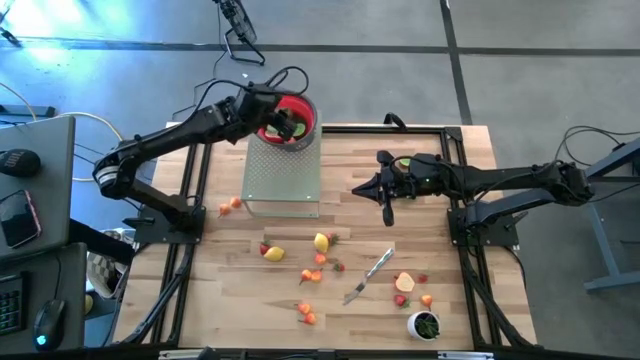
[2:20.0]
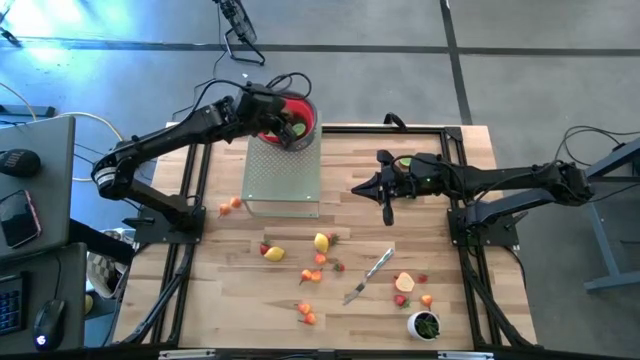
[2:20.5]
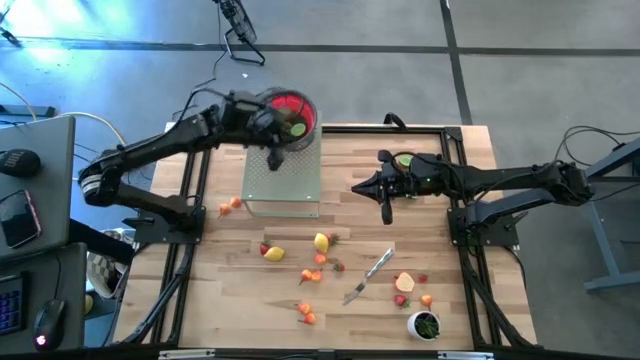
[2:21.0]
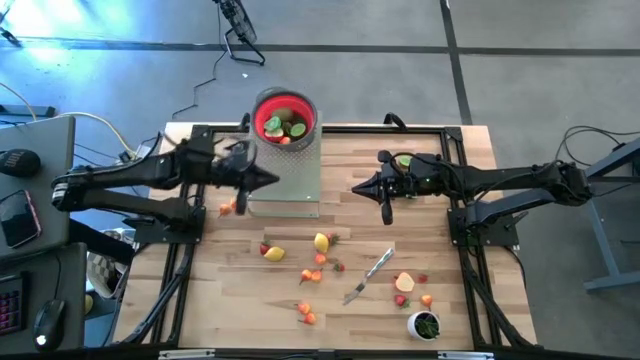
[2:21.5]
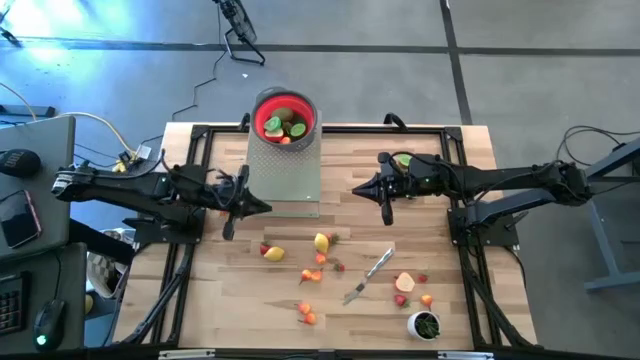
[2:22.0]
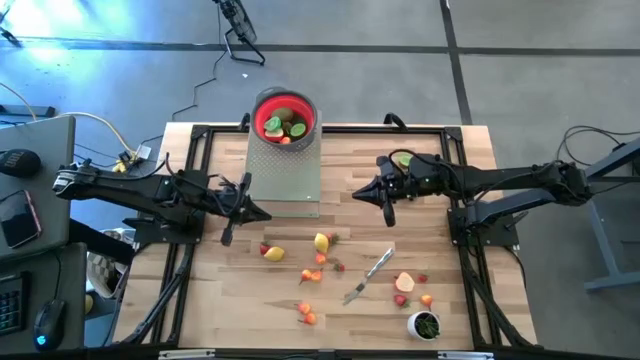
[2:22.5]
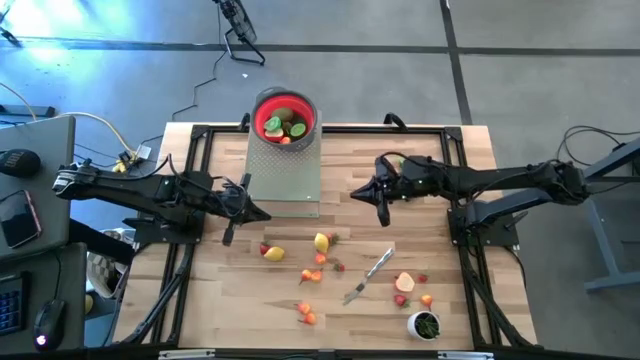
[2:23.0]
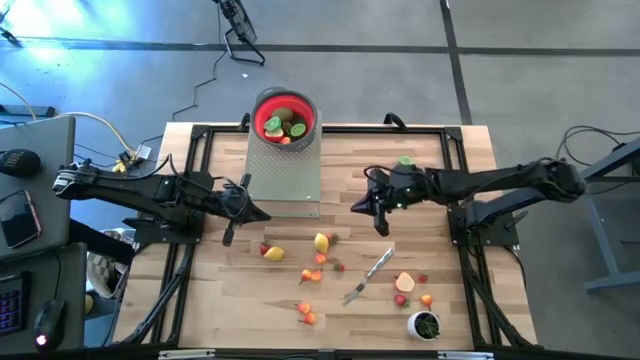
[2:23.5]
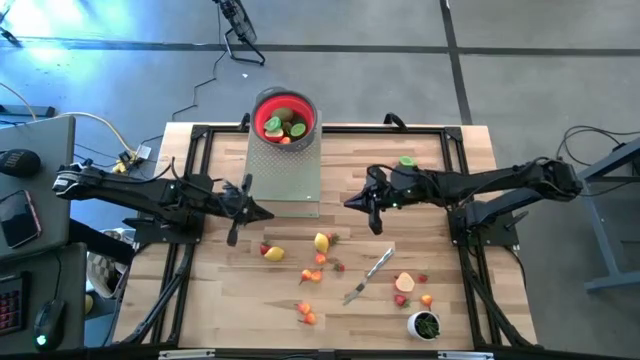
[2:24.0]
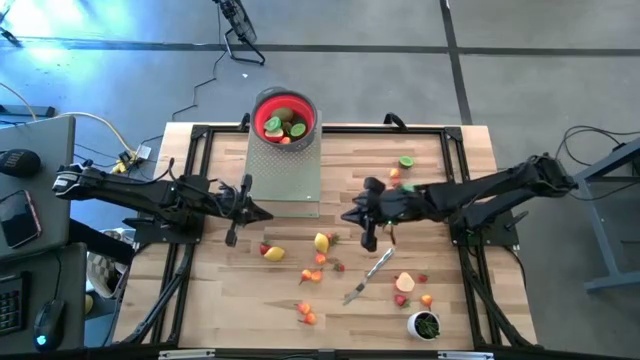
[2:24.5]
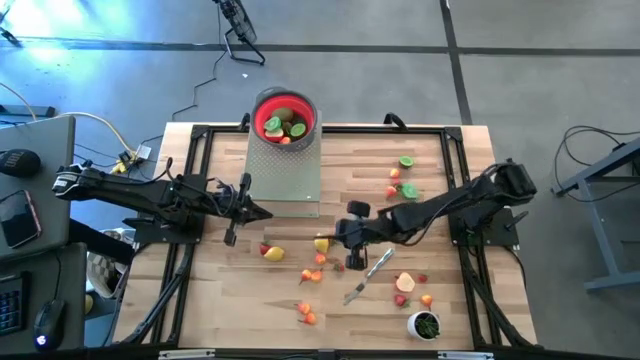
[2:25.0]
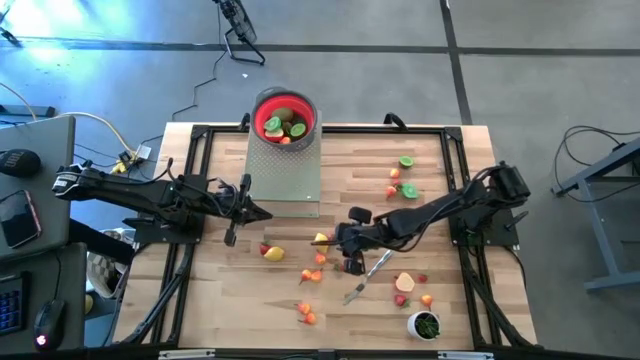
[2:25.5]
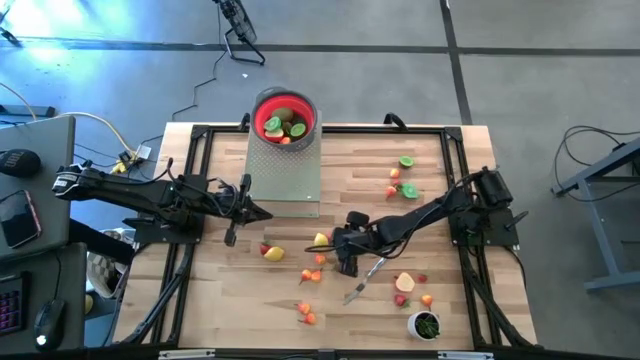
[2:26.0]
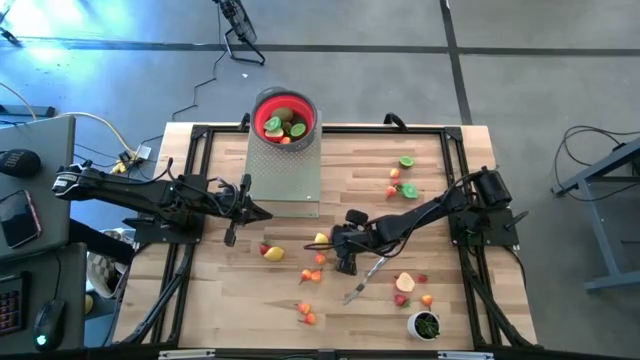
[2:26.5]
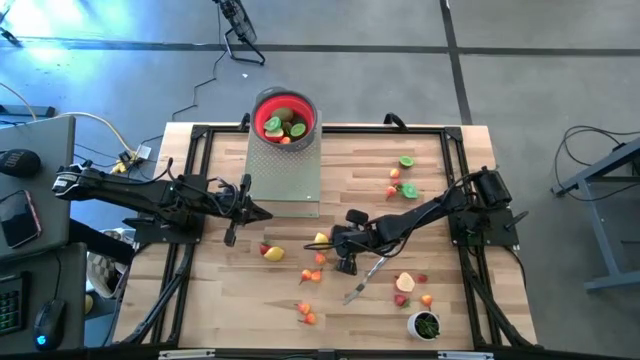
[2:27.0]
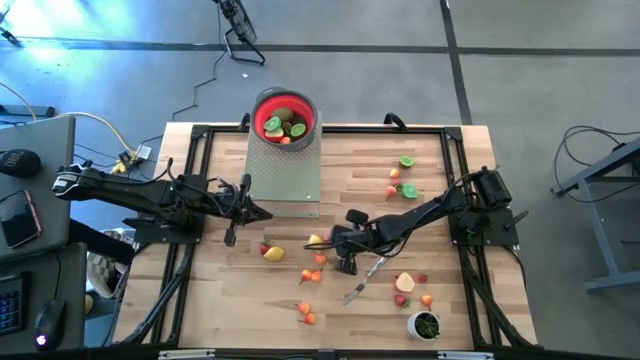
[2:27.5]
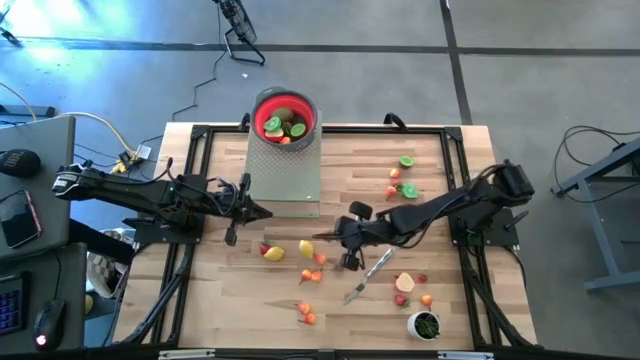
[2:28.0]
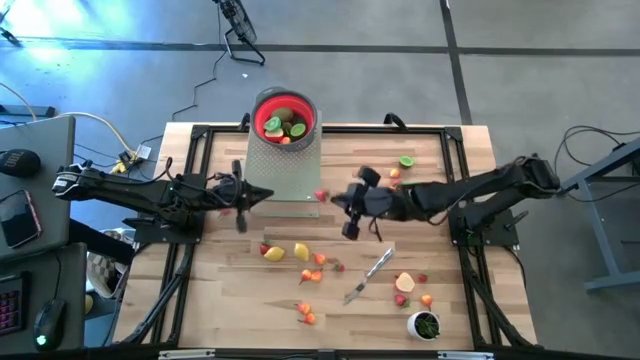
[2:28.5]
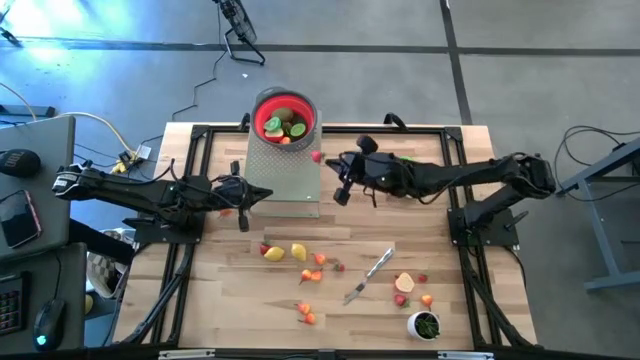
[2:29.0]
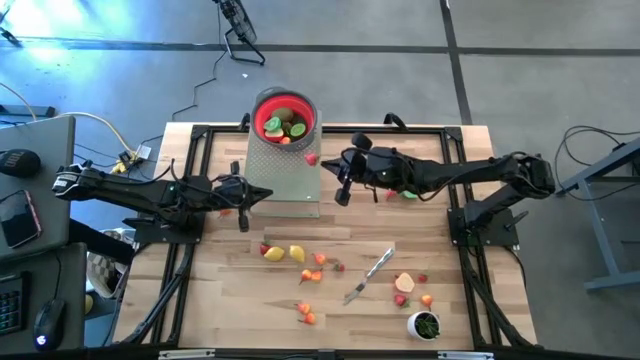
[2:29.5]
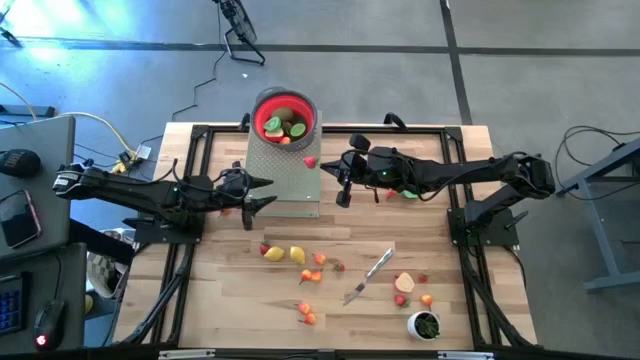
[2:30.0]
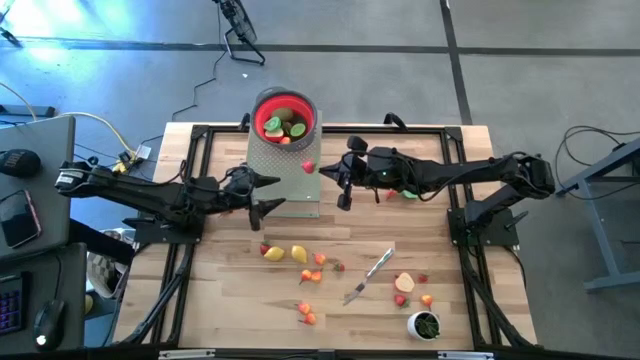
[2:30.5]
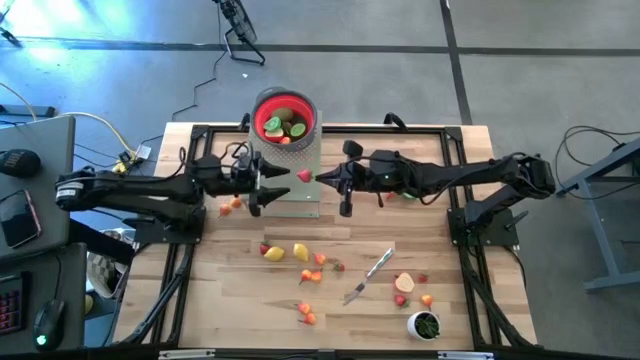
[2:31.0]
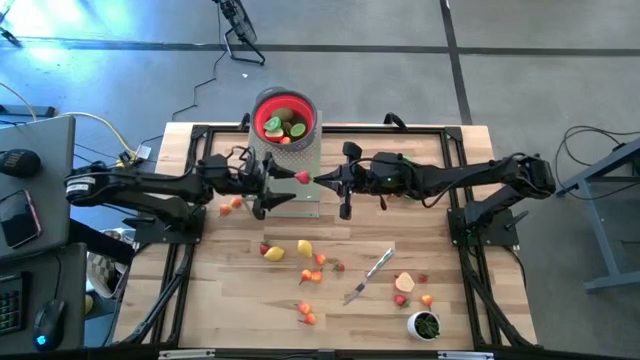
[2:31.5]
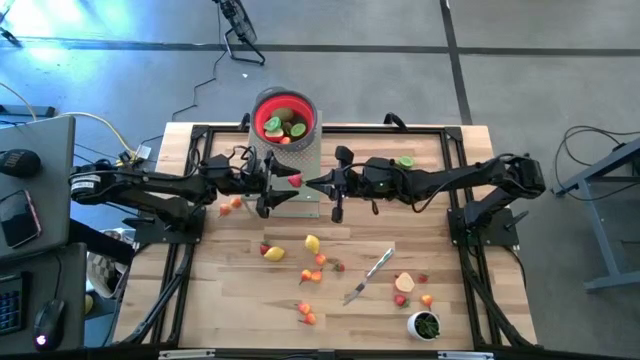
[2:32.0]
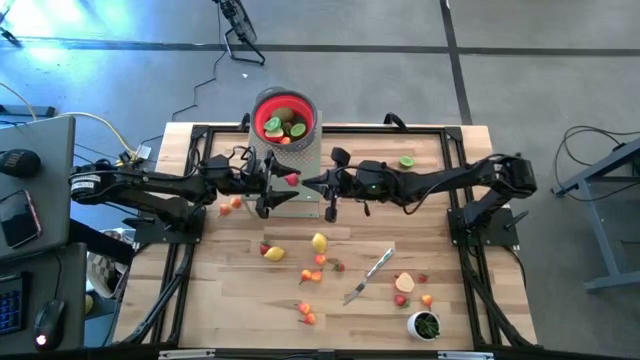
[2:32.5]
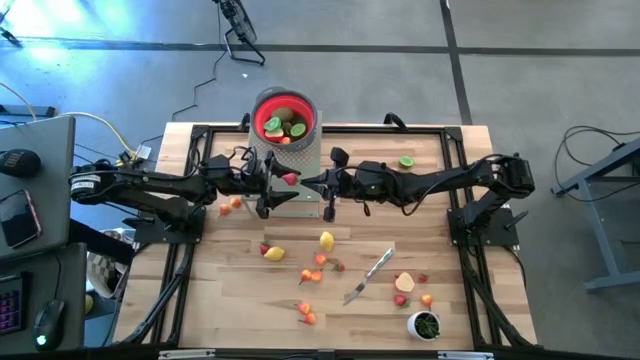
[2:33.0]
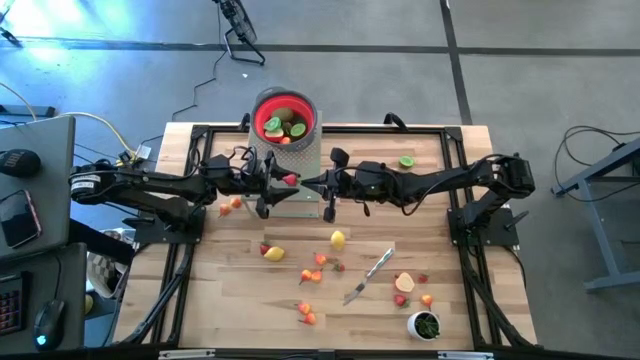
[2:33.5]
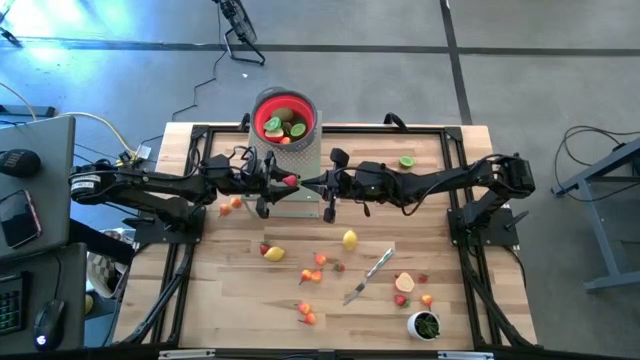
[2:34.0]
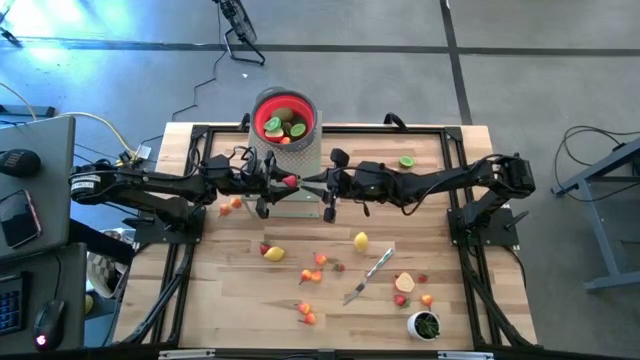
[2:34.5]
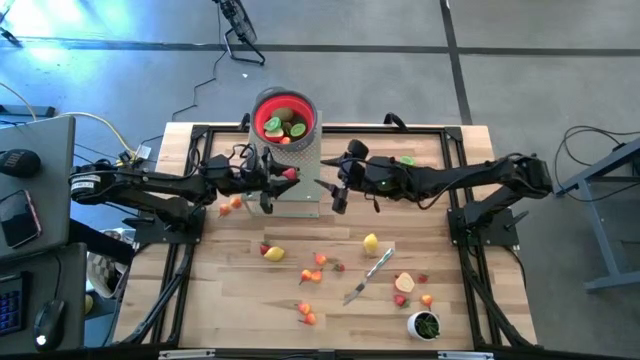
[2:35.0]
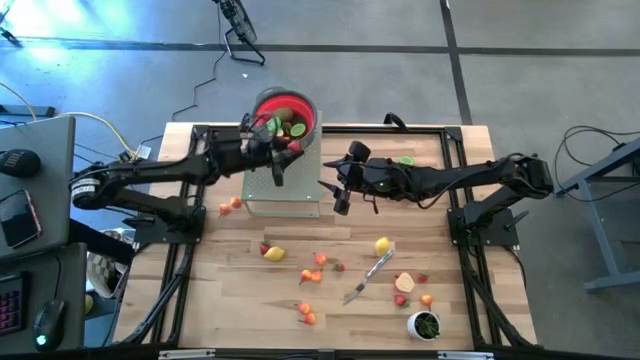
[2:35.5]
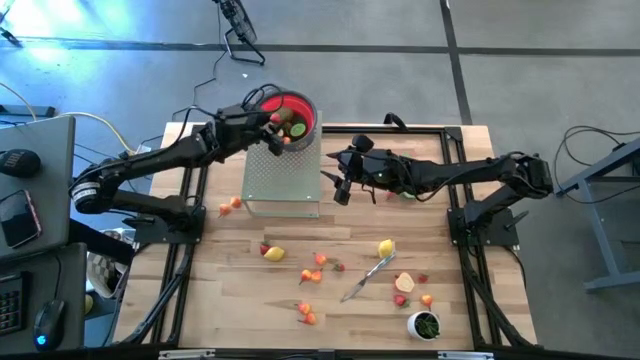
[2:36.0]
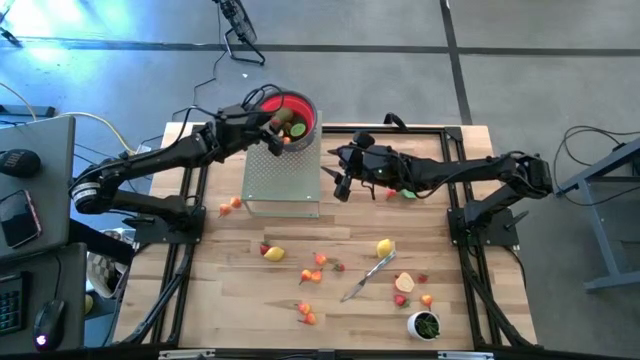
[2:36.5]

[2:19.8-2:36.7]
Task: Pick & Place Fruit
Put the strawberry into the red strainer on the shelf

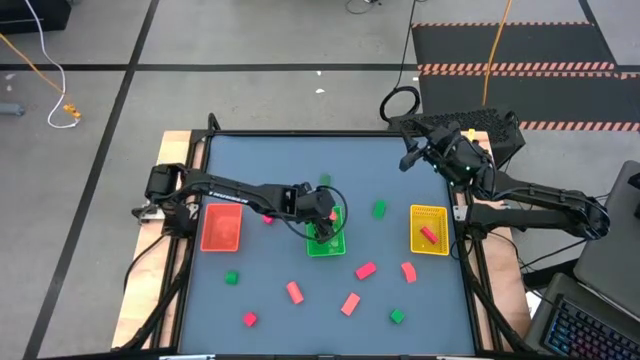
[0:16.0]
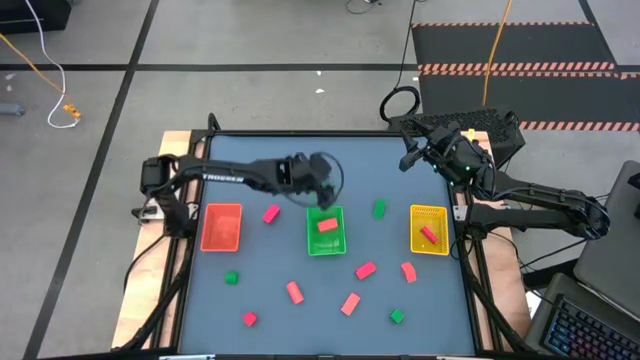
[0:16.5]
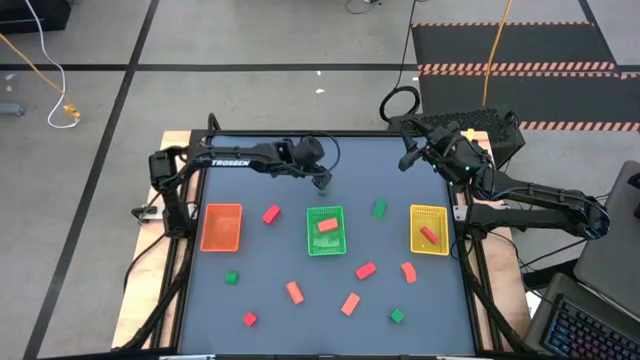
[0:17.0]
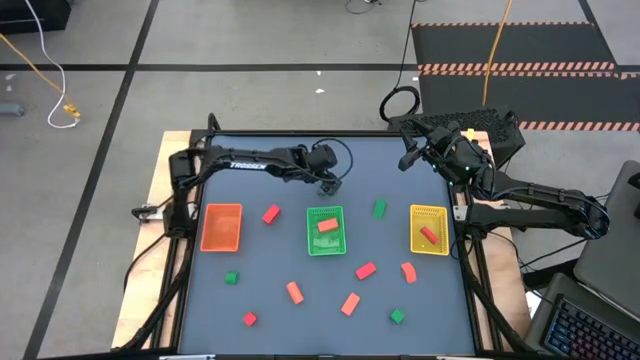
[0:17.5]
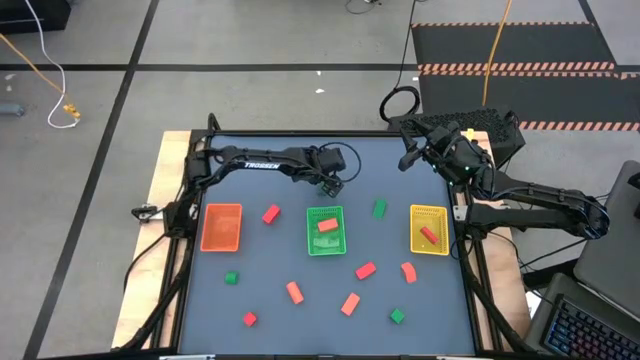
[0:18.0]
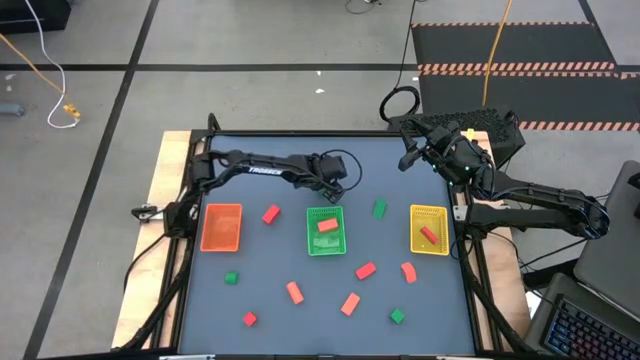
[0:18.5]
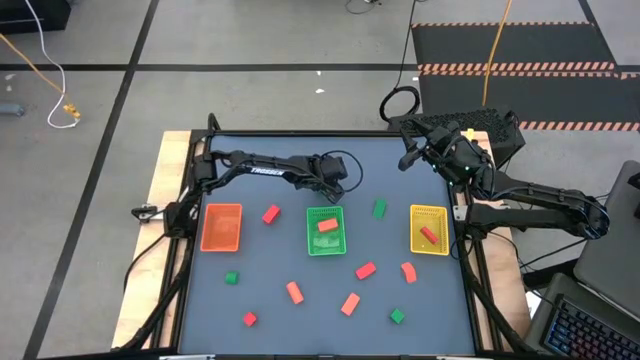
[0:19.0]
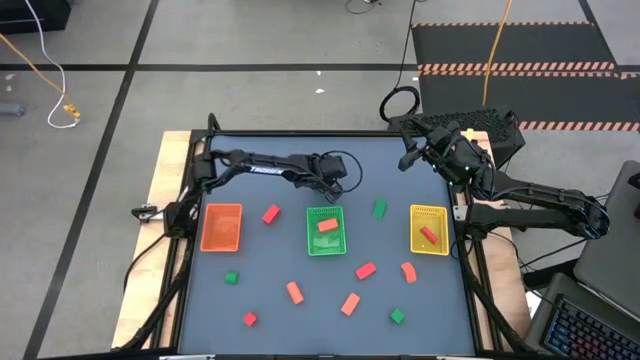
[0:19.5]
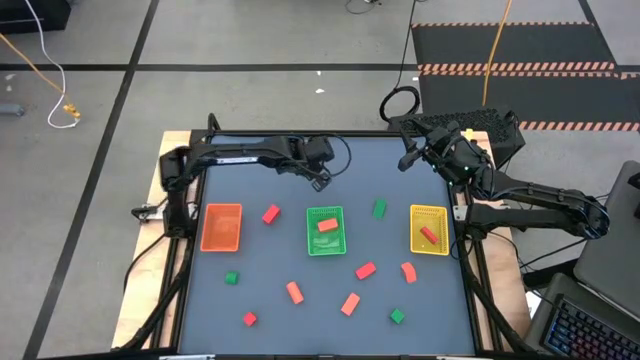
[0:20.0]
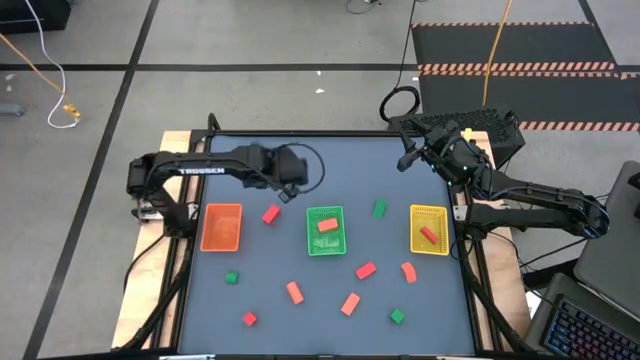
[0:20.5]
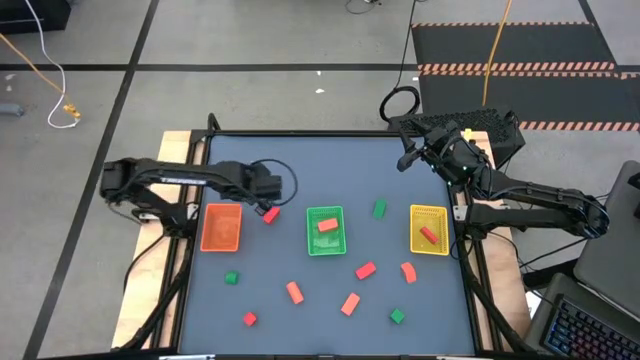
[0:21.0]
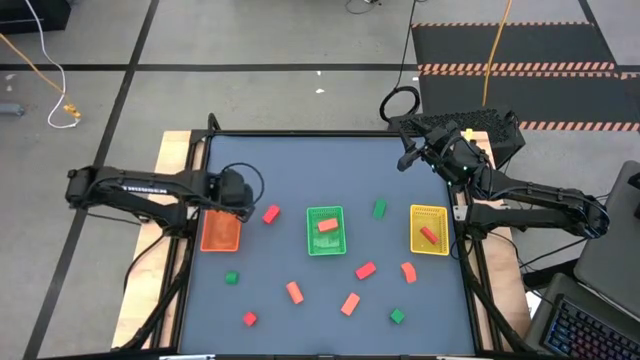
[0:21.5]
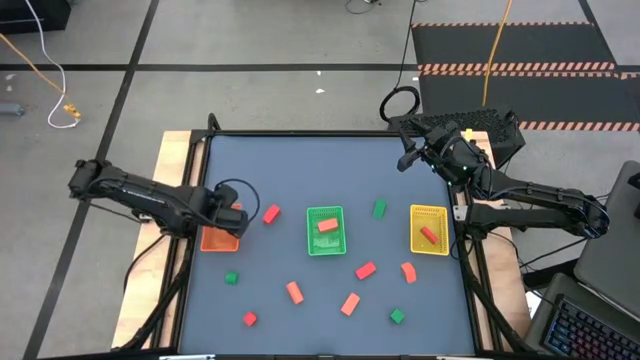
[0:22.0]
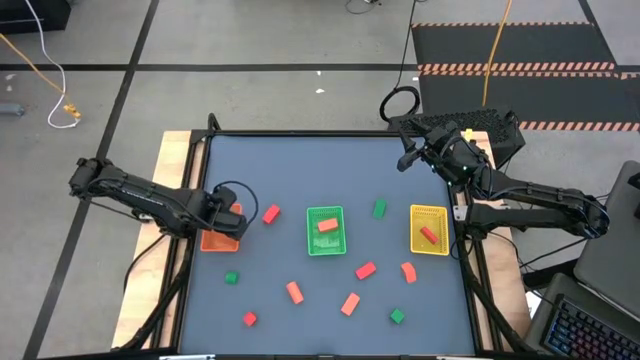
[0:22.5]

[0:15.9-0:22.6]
Task: Sort & place blocks by color
Put the green block into the orange bin
